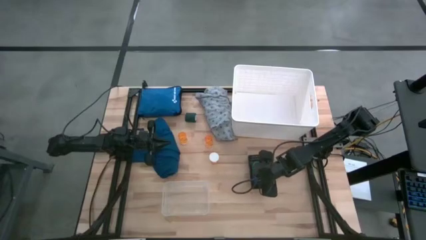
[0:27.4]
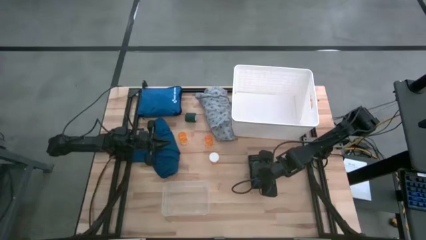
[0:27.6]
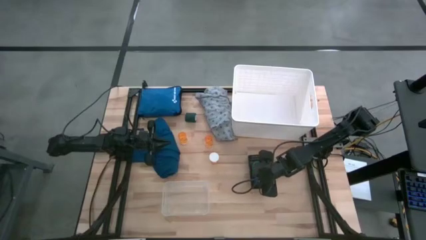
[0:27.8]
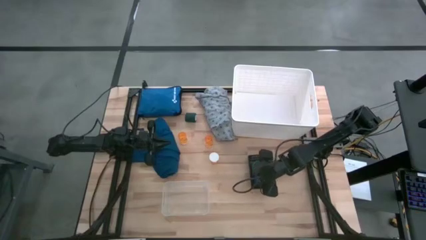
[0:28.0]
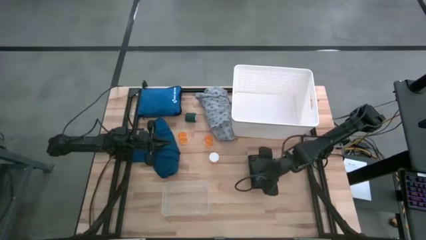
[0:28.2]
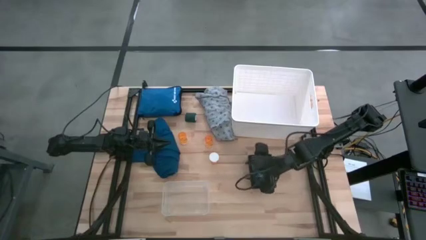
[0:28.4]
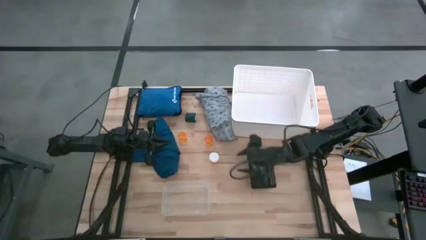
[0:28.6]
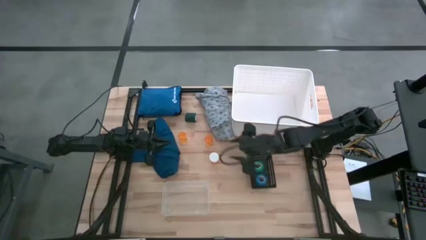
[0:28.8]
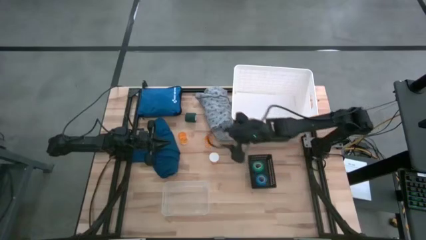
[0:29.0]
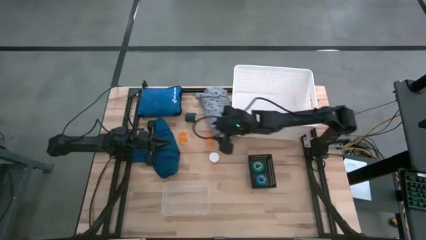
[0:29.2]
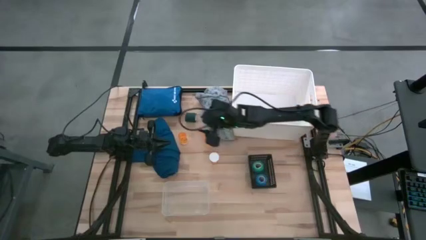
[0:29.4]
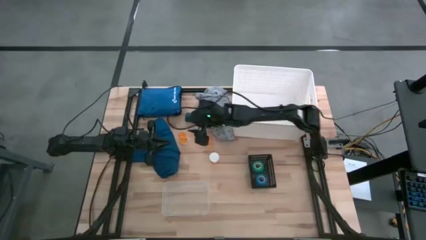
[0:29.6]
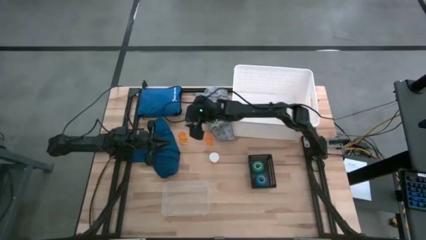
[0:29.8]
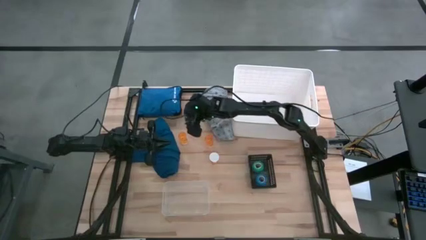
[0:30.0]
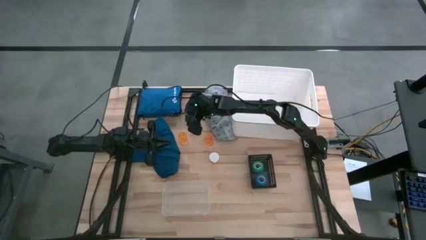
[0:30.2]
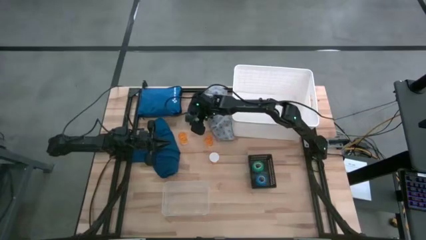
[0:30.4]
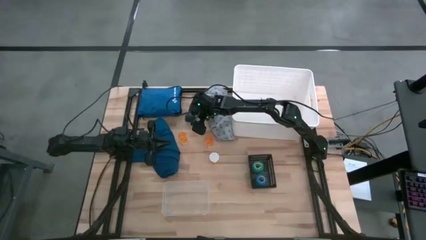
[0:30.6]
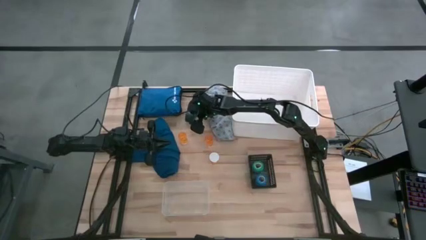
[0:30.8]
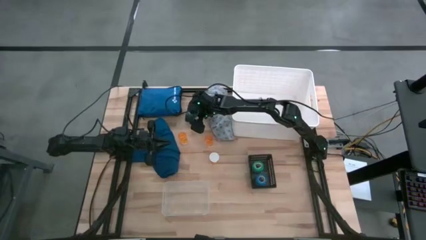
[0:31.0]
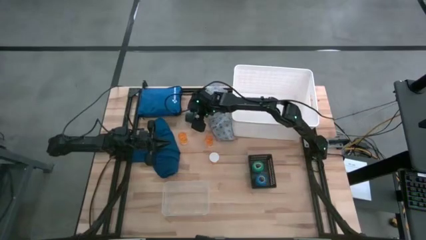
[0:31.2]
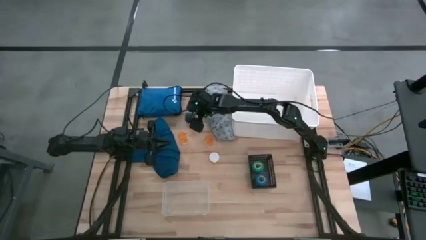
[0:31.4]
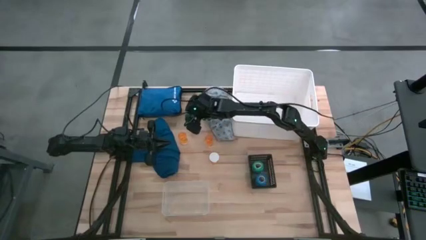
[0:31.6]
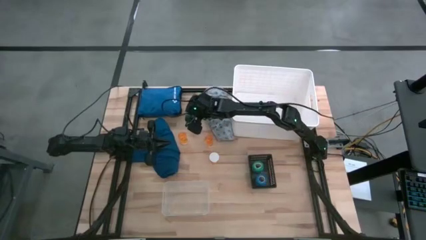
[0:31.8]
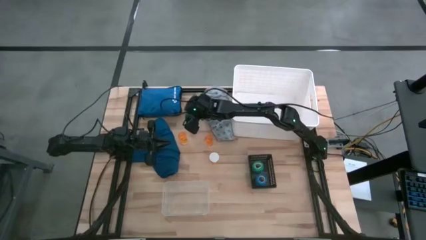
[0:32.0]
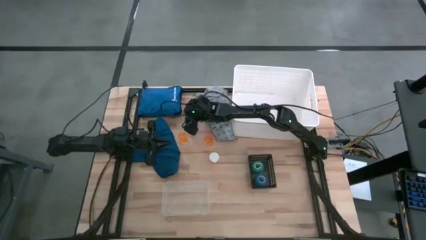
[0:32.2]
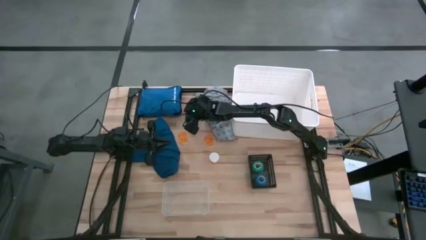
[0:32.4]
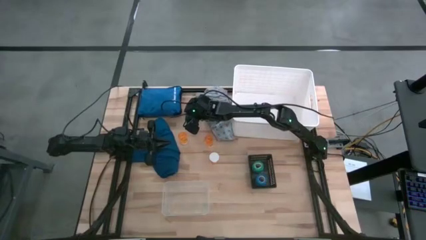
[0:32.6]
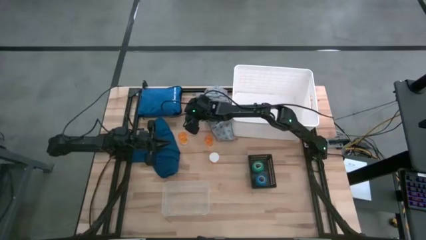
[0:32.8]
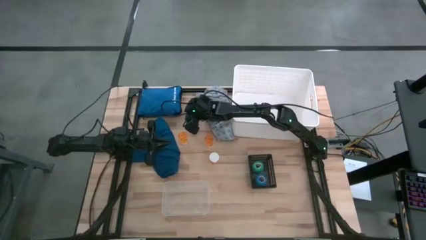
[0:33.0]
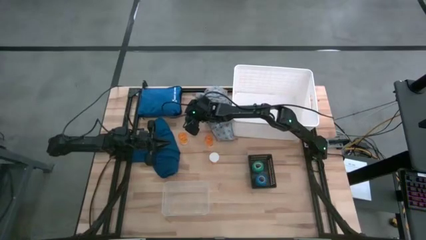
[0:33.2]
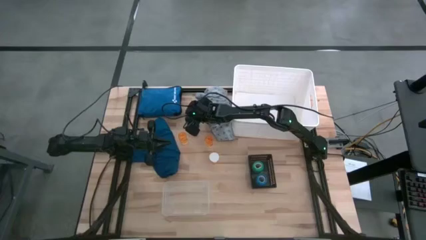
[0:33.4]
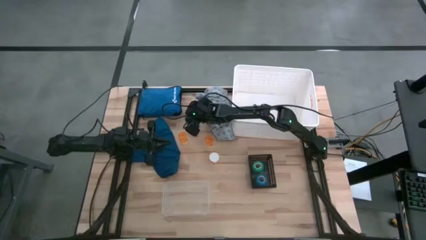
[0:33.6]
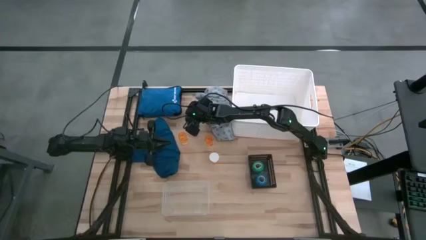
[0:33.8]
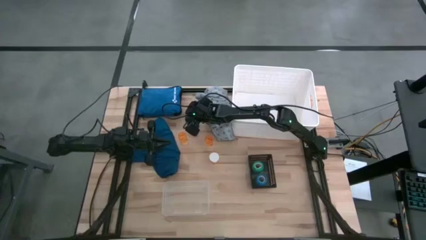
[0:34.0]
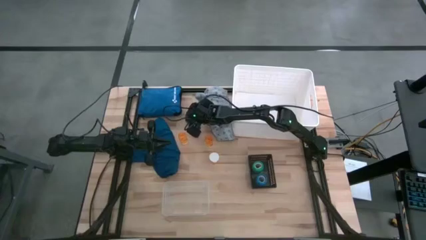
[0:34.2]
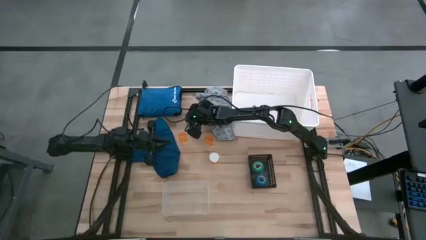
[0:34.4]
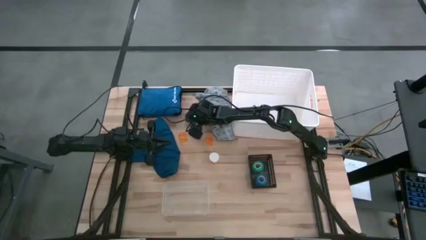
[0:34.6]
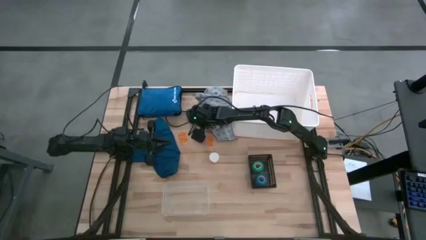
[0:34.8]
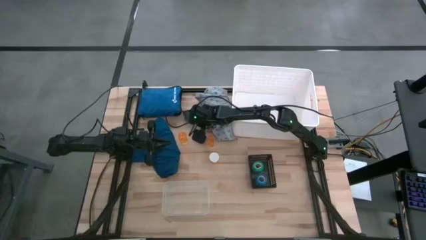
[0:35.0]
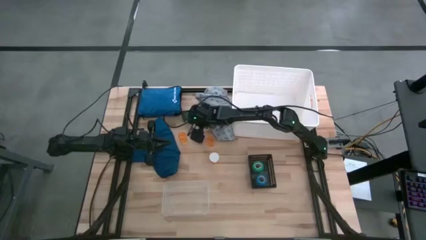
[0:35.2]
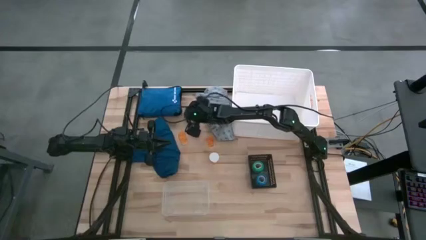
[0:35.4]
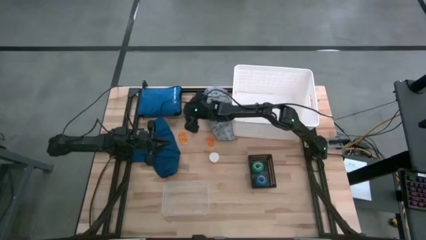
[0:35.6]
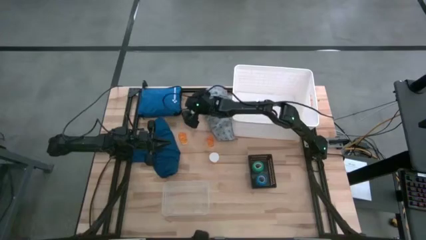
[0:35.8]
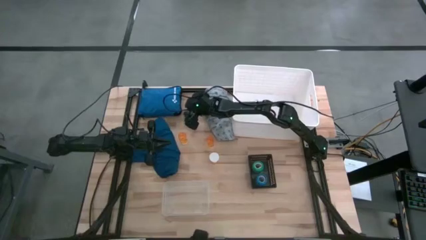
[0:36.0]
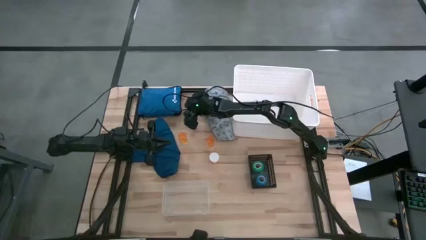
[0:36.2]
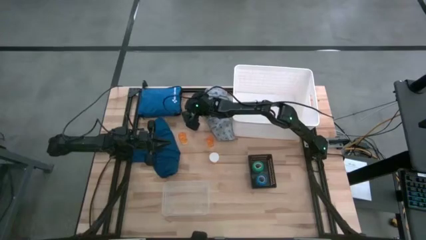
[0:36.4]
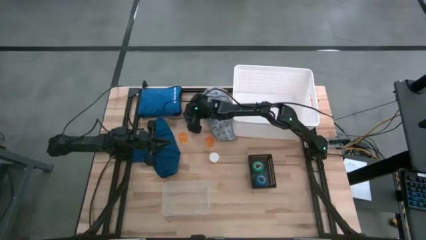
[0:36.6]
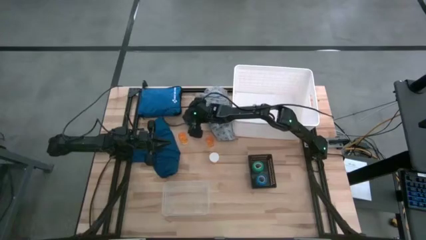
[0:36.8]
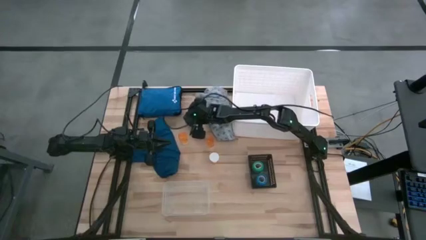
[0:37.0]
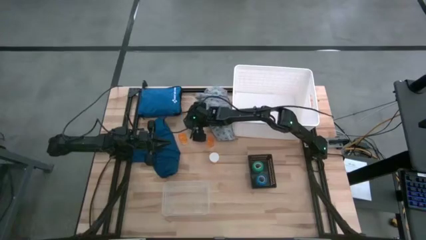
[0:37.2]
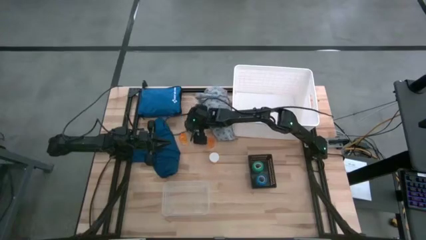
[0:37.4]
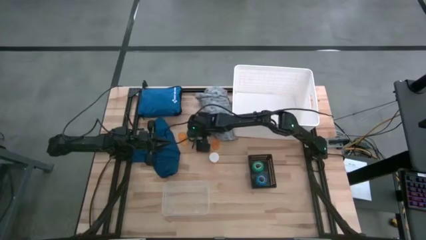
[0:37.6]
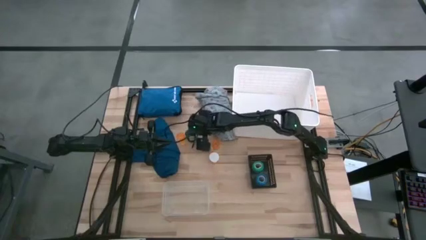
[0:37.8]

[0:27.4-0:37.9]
Task: Pick & place medical supplies in basket/bin
Put the green bandage into the black bin

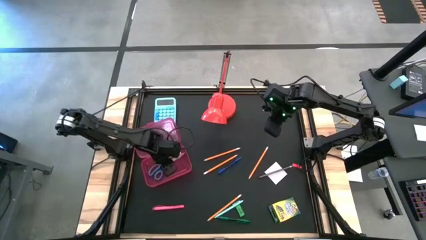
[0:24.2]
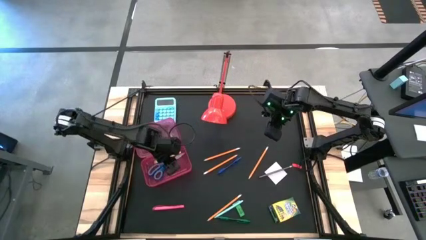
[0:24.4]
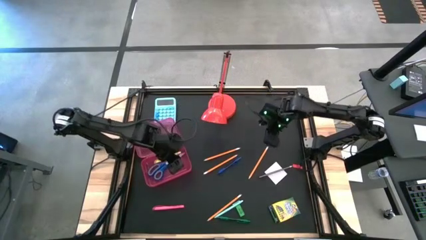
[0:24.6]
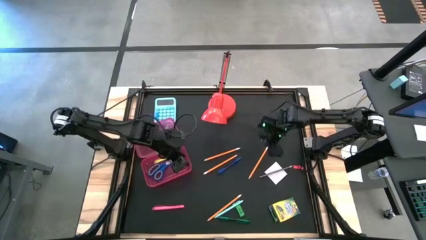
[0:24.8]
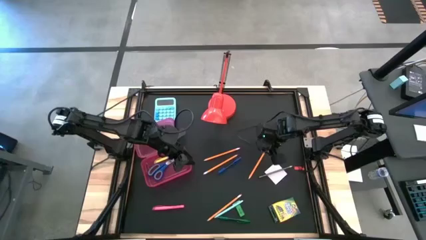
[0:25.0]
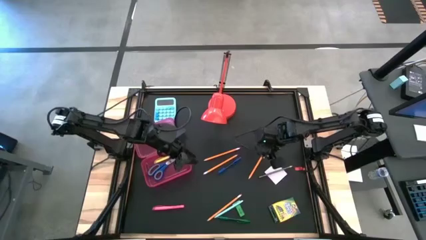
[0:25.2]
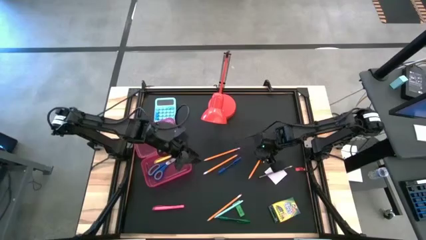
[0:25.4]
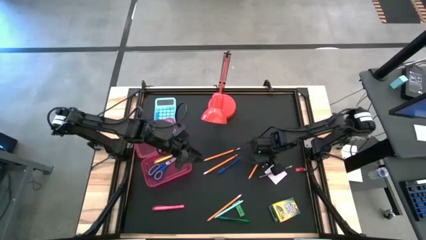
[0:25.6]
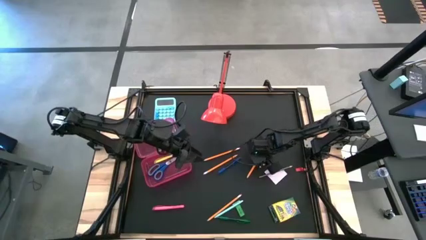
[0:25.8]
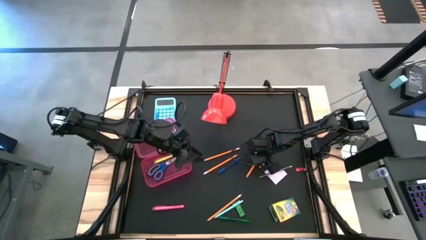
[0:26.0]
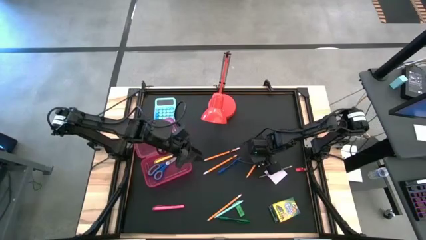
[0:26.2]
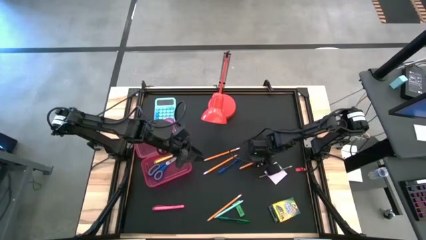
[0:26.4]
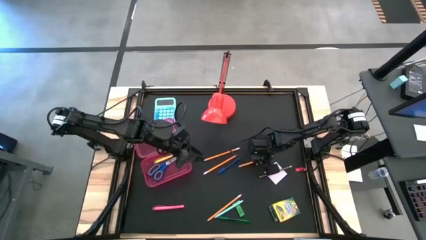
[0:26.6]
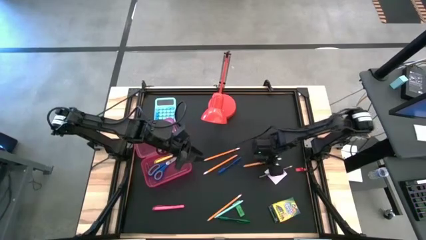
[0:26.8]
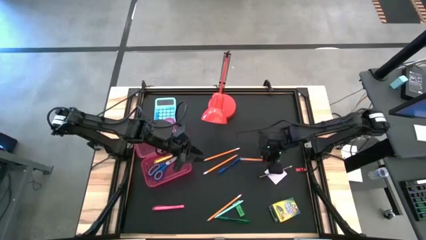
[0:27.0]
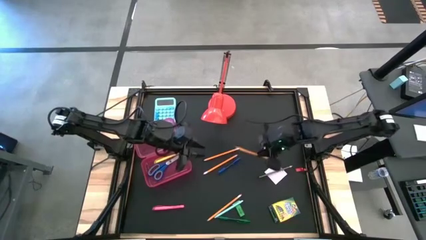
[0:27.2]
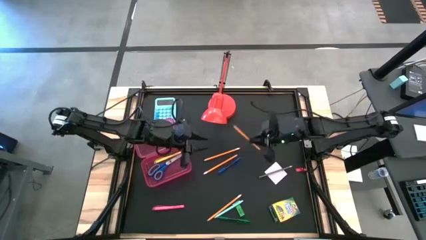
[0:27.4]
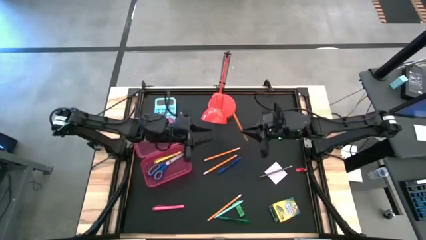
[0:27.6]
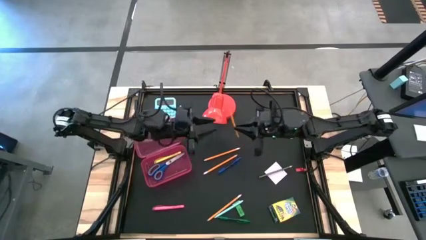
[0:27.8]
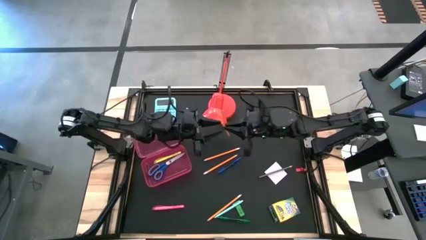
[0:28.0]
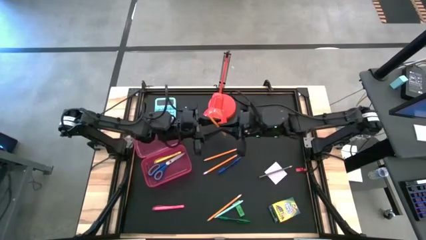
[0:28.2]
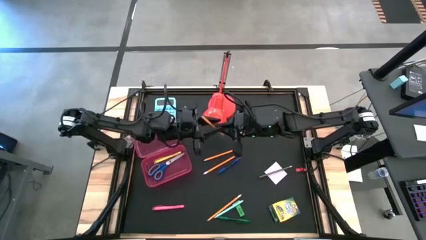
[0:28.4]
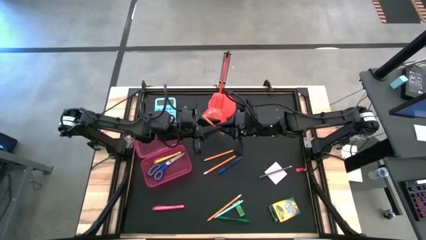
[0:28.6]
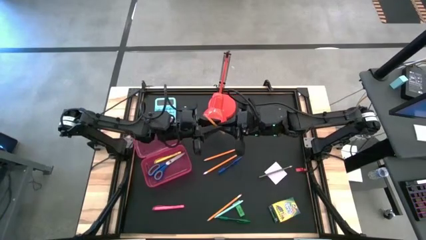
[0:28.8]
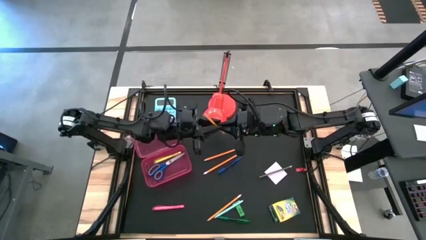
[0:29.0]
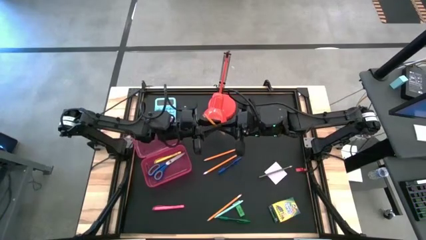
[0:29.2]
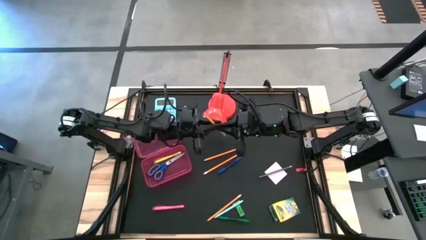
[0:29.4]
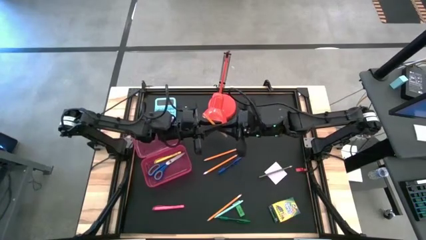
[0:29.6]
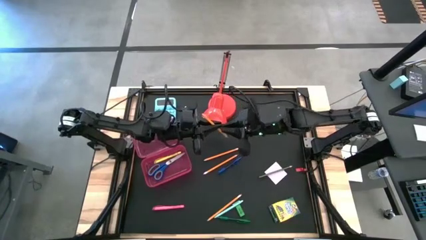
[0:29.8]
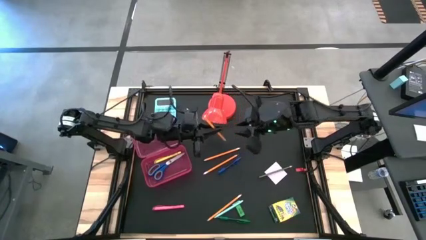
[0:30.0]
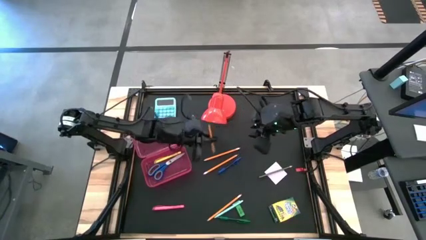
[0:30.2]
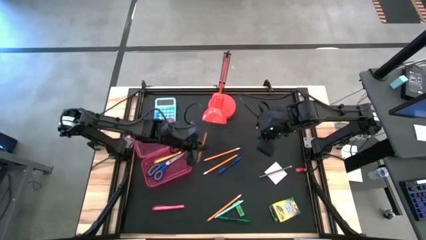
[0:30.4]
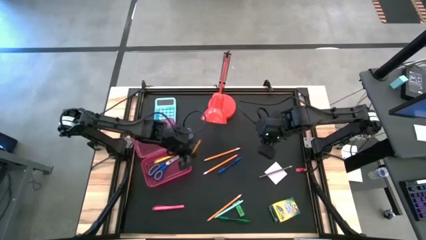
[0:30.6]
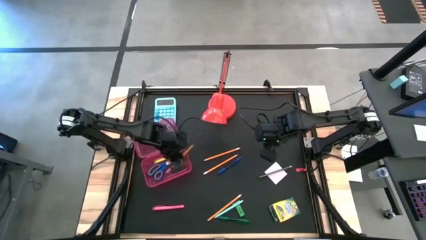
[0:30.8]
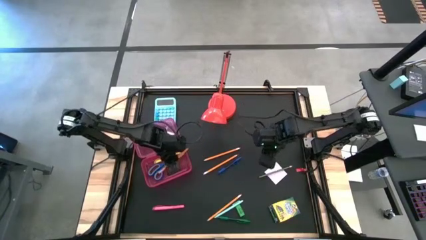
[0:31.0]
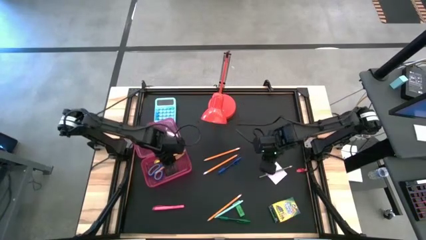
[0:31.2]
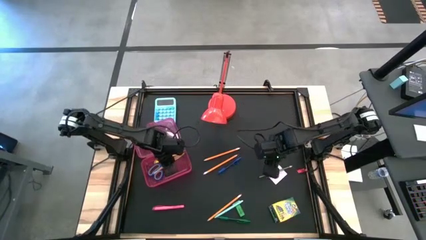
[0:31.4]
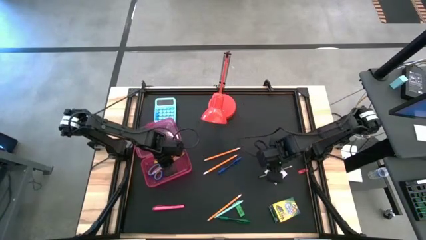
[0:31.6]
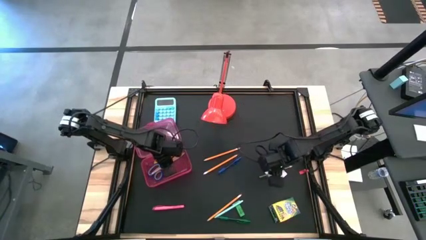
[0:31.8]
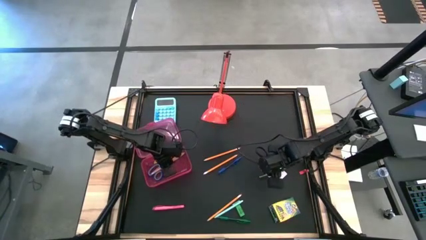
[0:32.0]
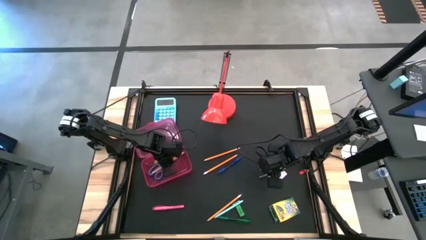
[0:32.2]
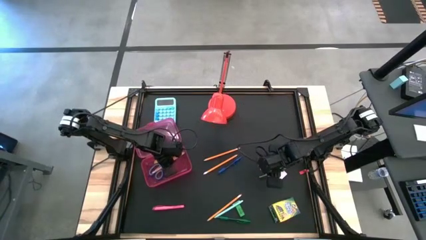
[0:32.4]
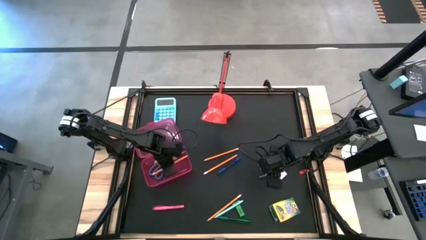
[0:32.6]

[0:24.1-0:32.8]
Task: Pack school essentials
Put the orange pencil into the red supply box
